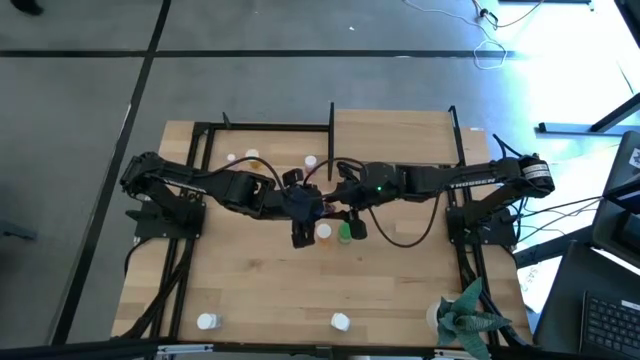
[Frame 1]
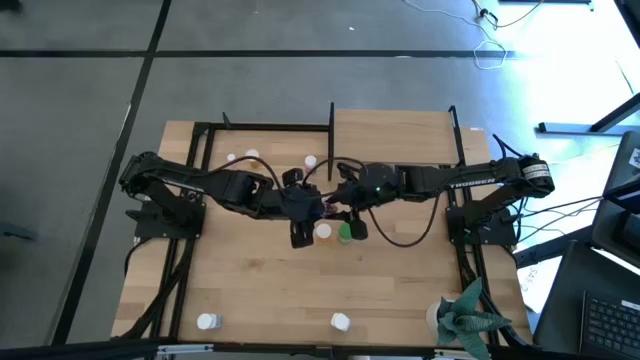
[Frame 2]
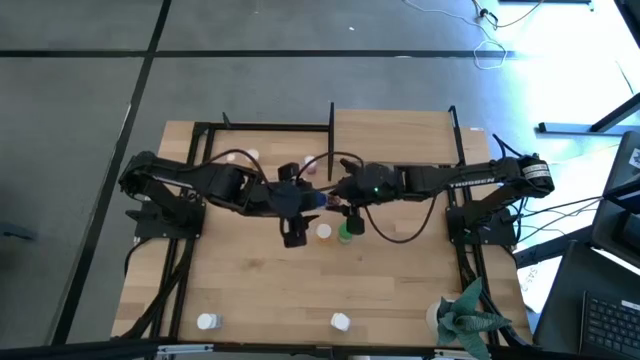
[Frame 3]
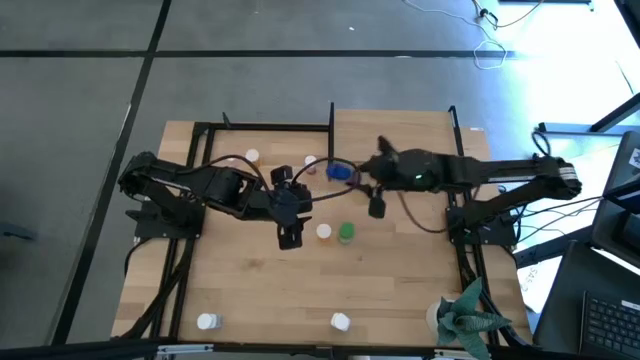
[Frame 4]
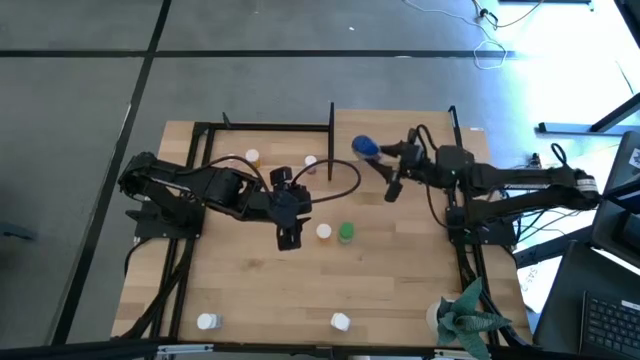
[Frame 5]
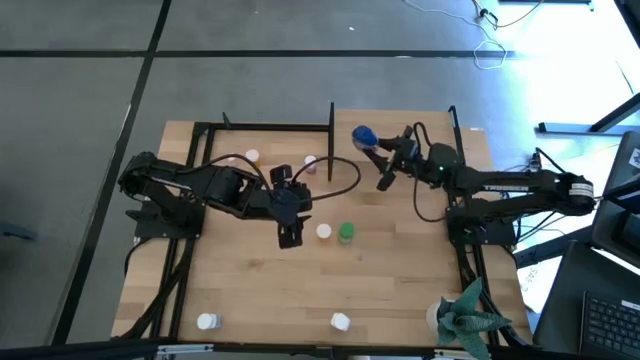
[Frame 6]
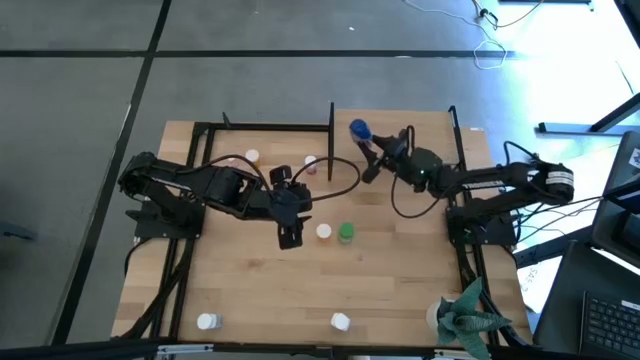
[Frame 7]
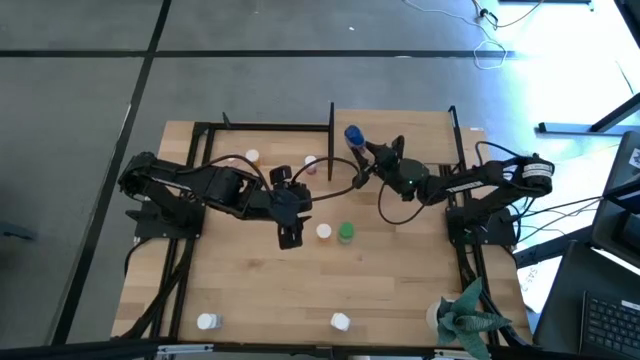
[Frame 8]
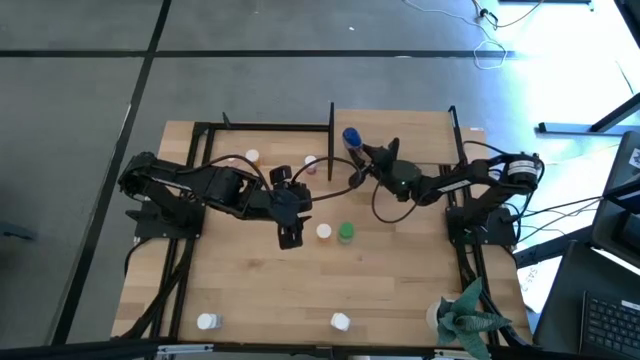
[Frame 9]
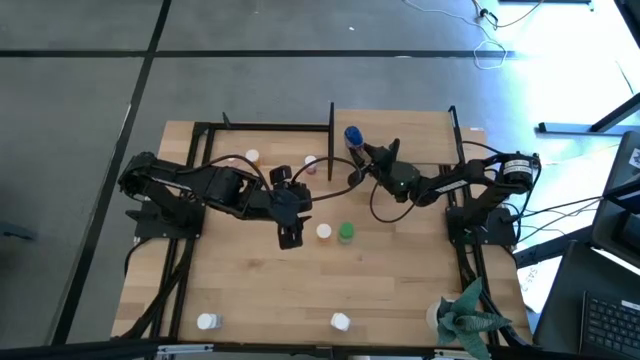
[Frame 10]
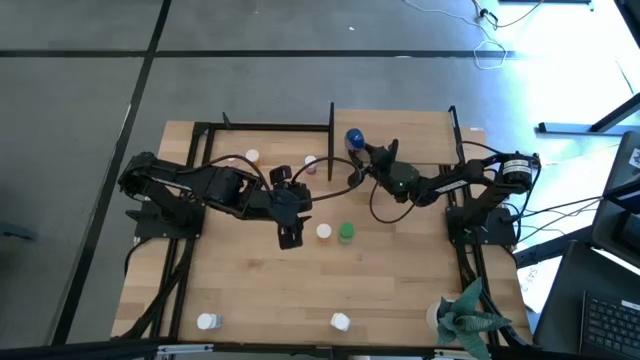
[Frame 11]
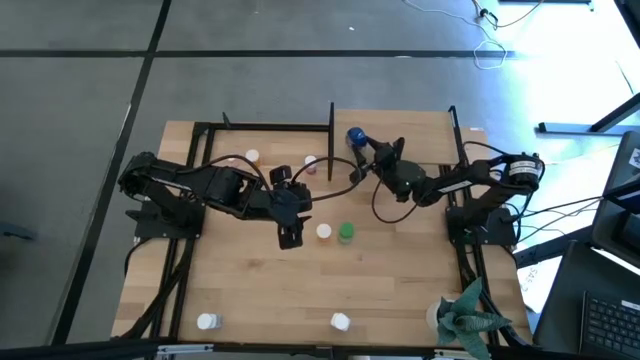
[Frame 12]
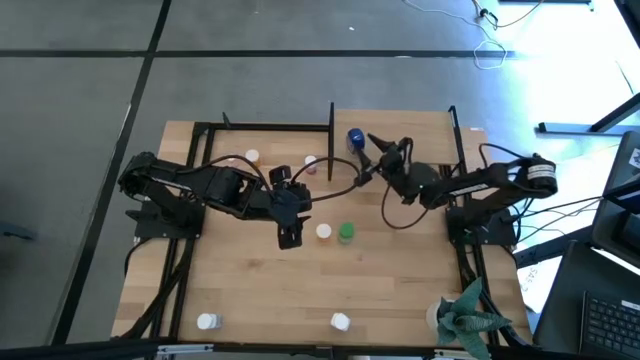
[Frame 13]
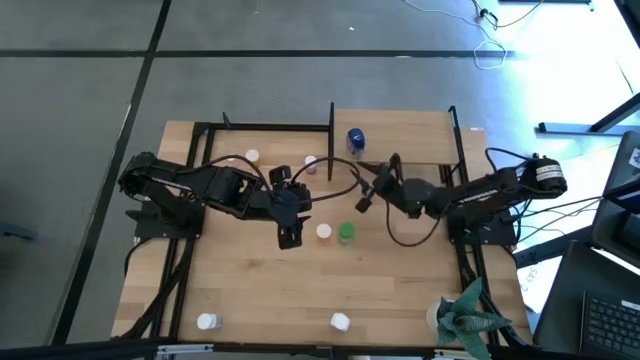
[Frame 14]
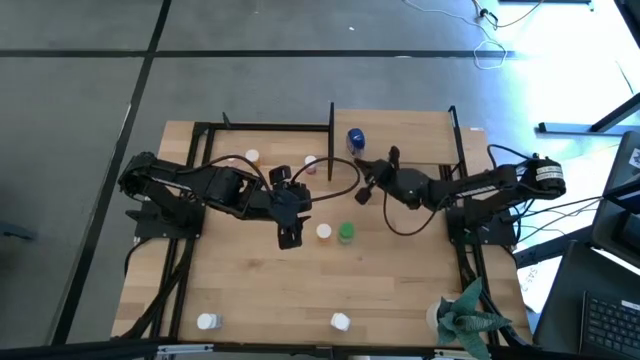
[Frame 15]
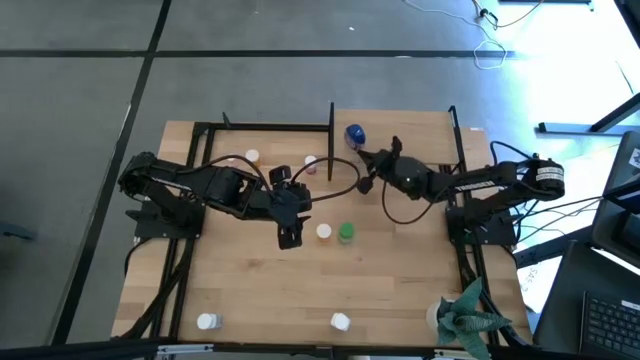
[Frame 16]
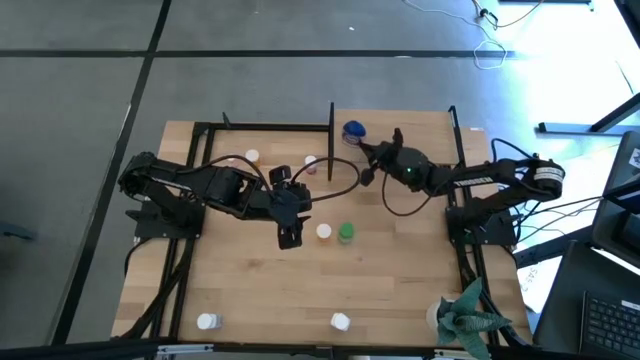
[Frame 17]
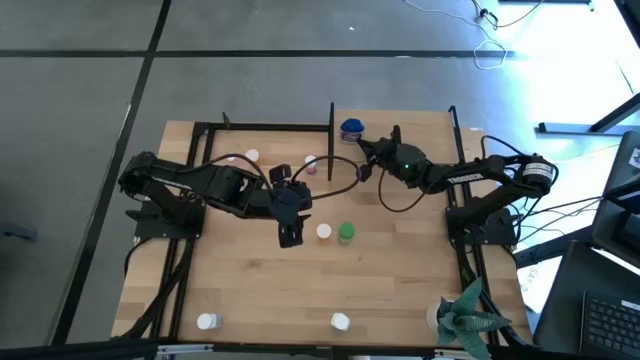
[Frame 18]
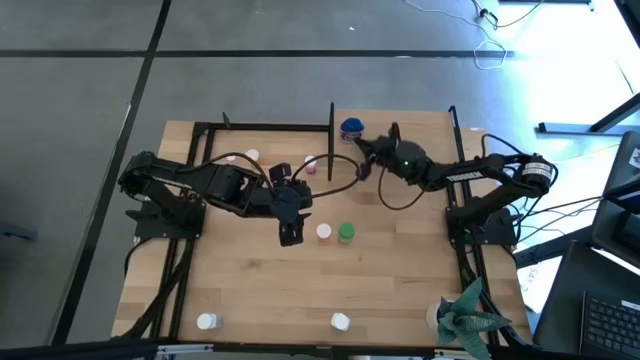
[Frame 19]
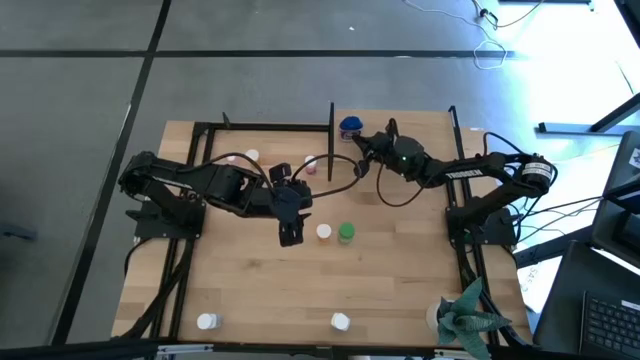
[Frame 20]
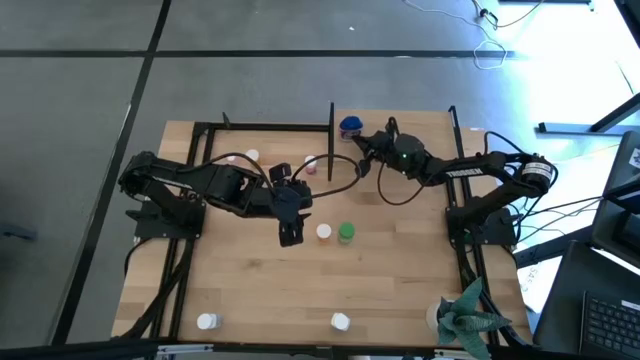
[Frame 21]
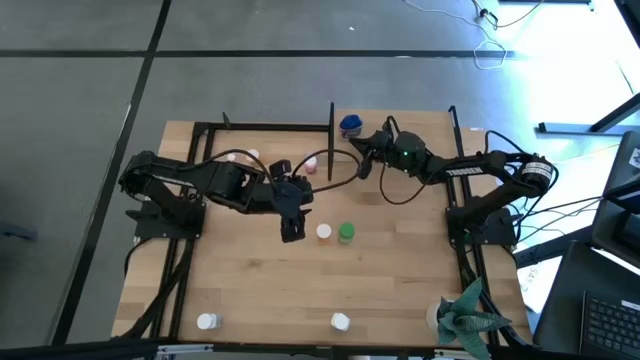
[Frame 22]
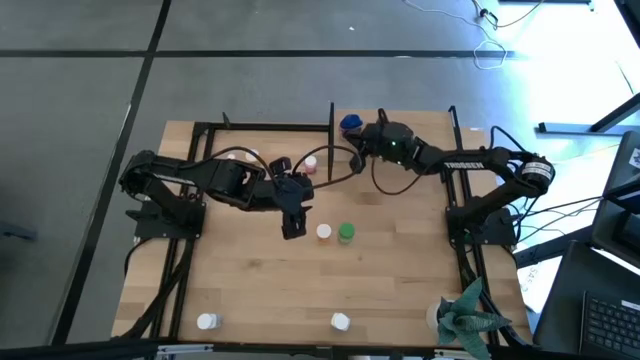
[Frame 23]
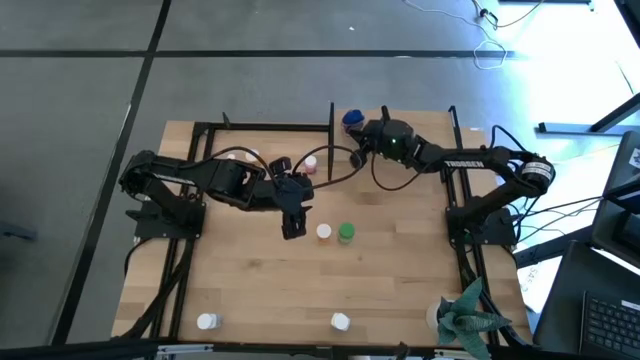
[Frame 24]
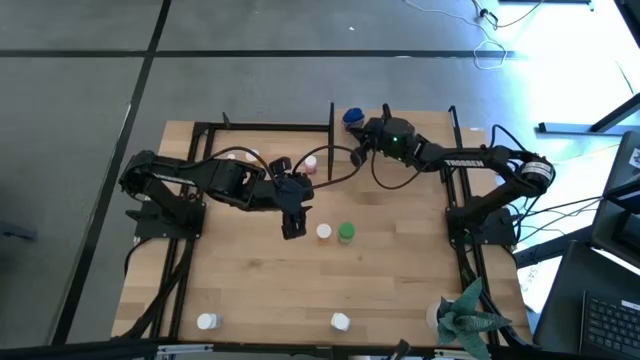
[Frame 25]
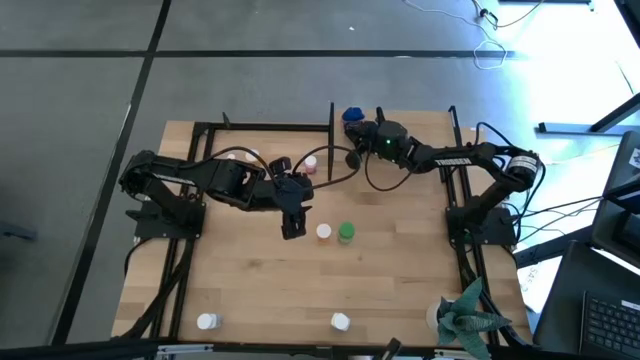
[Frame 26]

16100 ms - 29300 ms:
Task: Pick and place medicine bottles onto shelf by color
Put the blue medicine bottle on the shelf

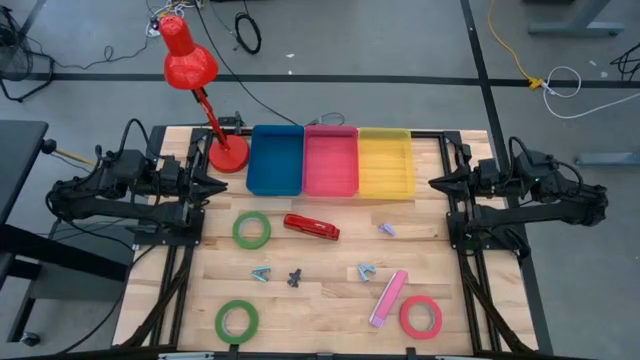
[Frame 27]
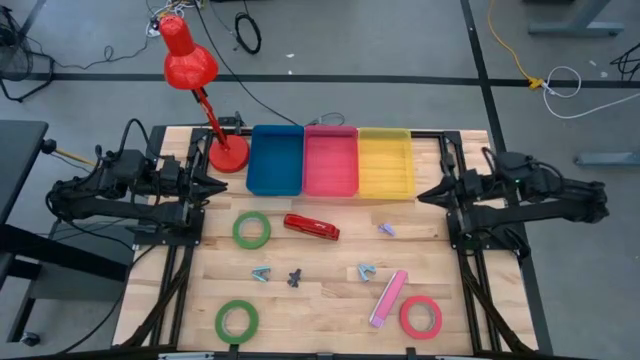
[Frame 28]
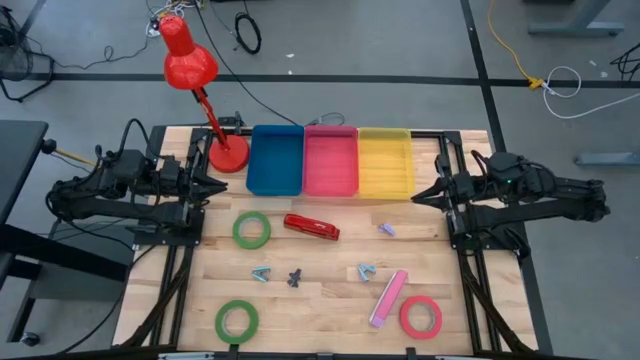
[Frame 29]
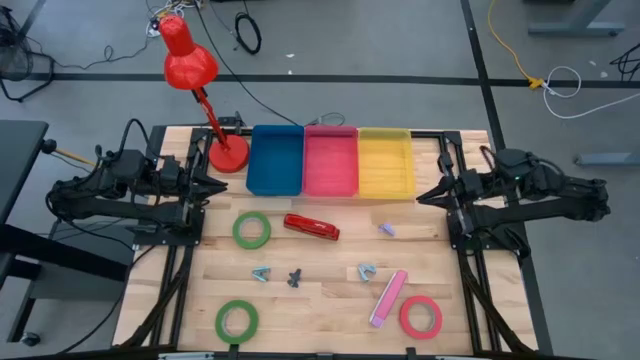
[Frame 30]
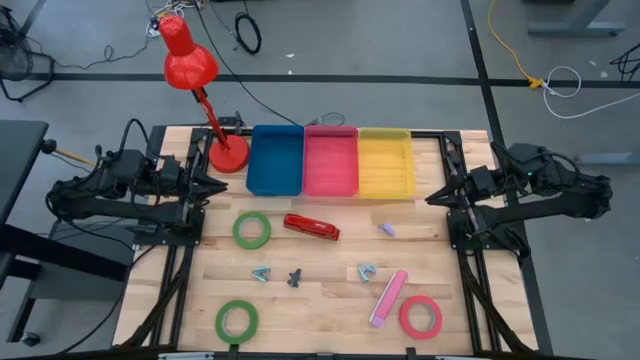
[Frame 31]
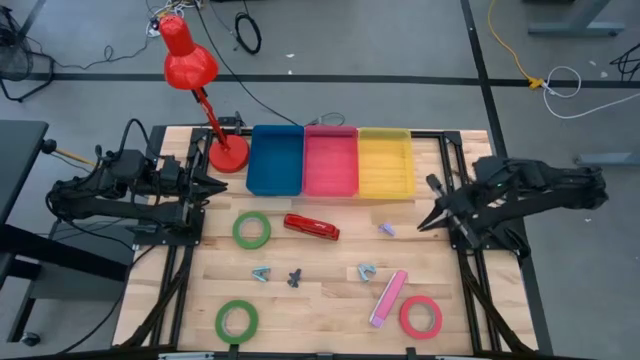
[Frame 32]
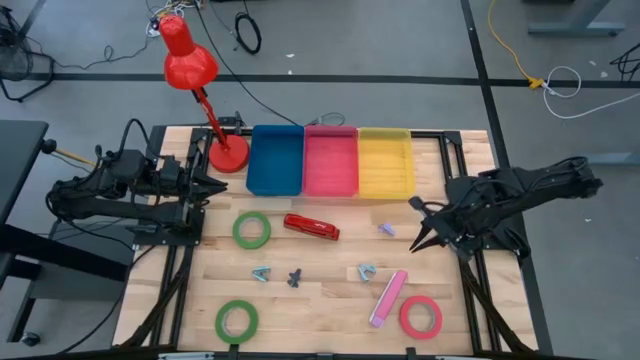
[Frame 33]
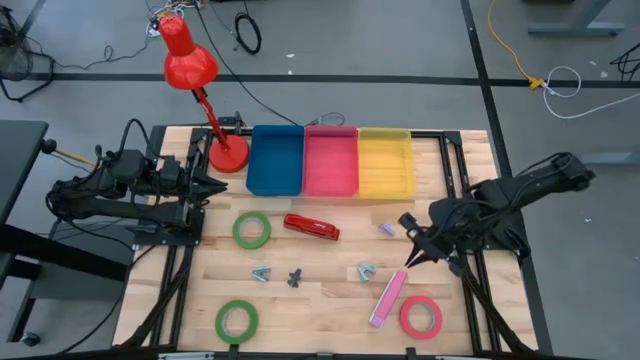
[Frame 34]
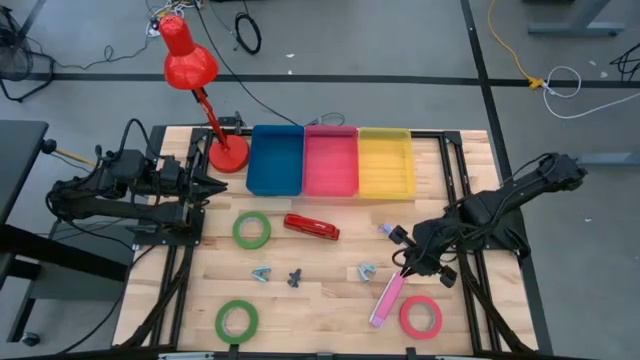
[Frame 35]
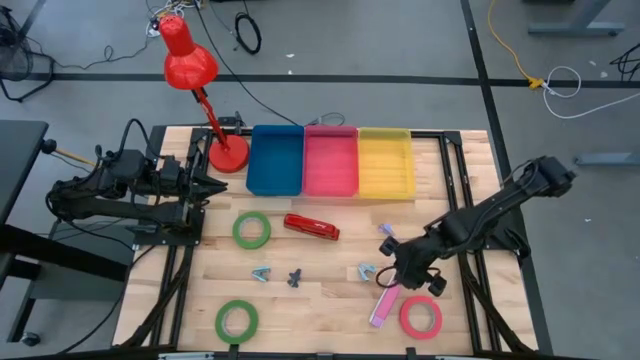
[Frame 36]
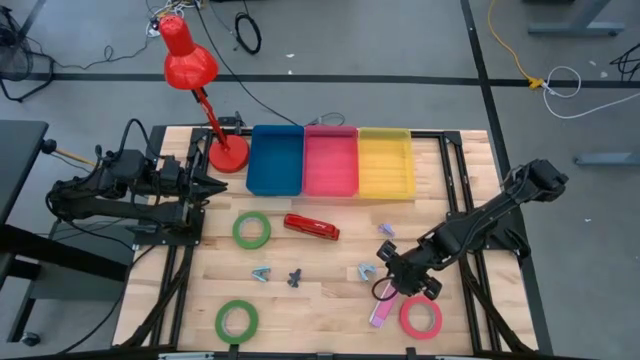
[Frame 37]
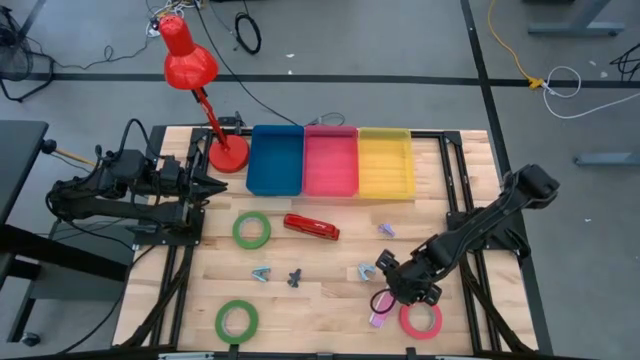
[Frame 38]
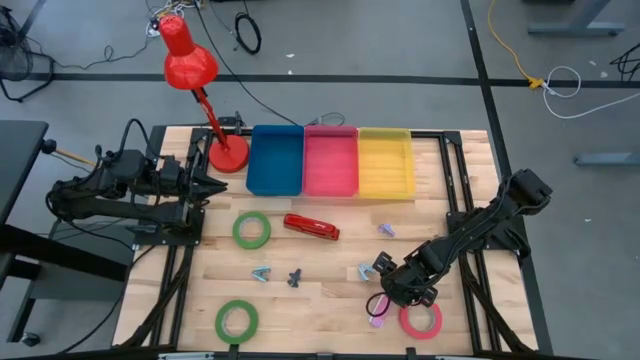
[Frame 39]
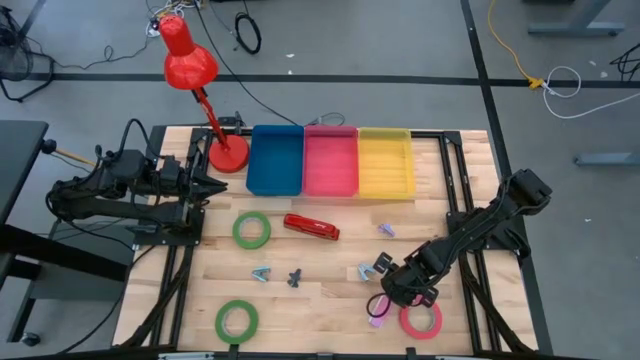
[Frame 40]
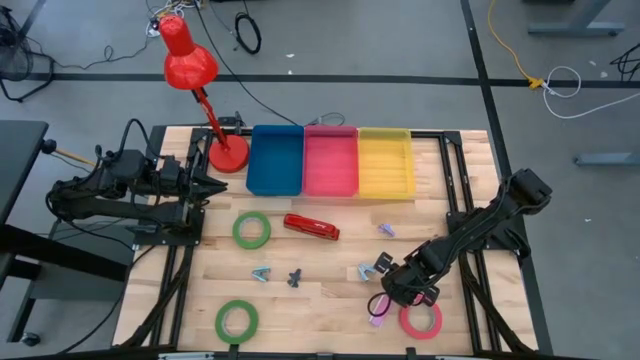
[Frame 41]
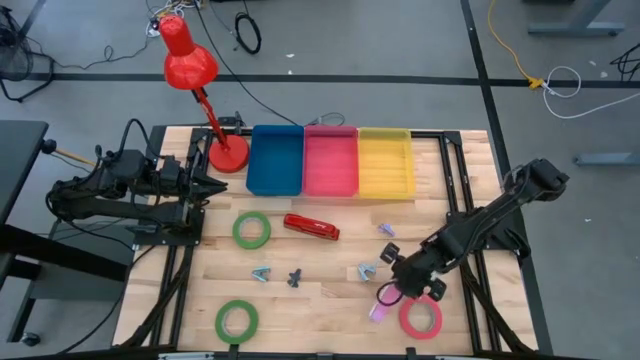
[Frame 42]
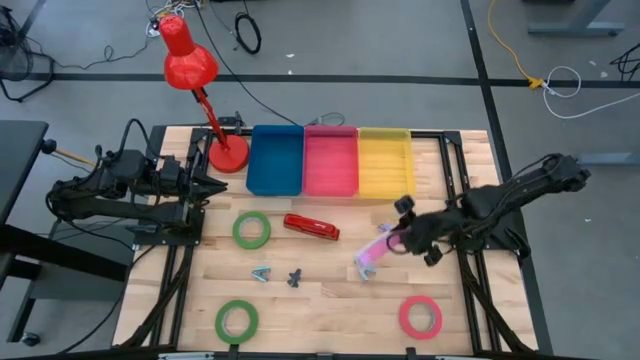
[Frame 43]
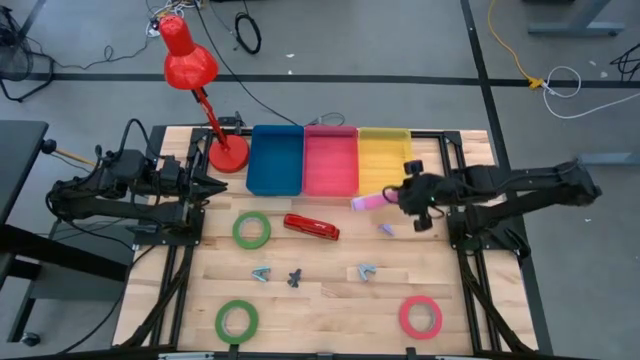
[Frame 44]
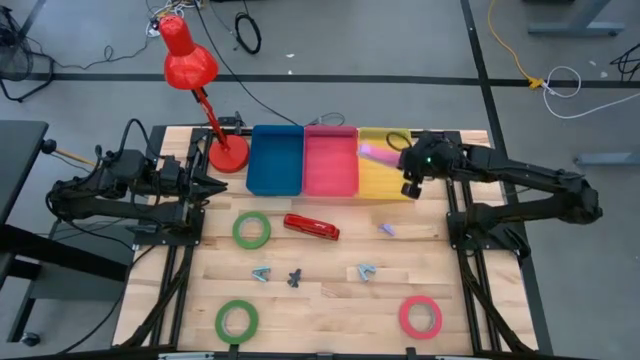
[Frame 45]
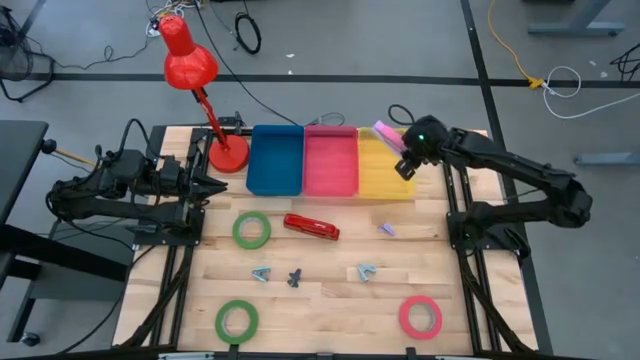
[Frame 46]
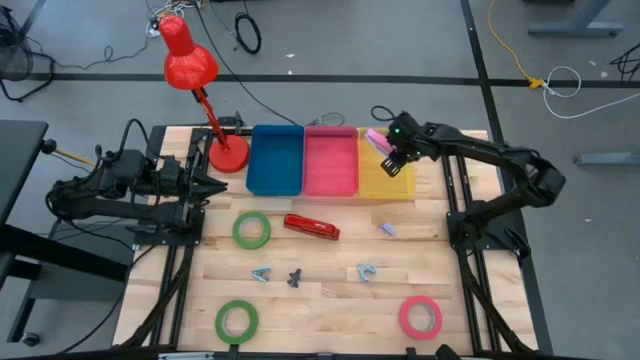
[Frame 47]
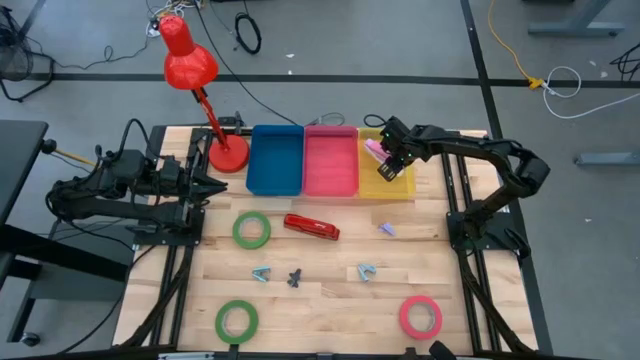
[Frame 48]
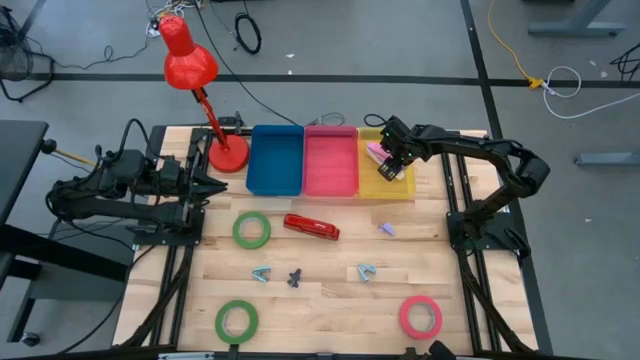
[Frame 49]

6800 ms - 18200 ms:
Task: Pick and place Stapler, Stapler remover, tape
Put the pink stapler into the yellow bin
